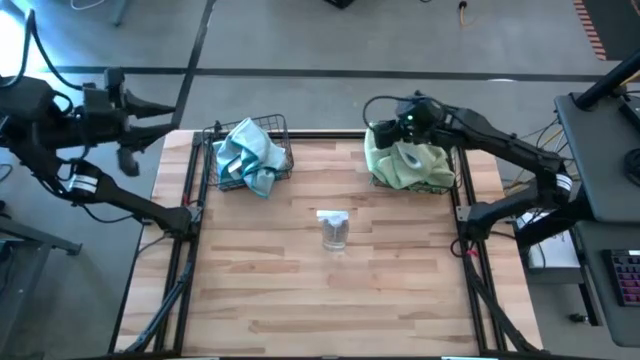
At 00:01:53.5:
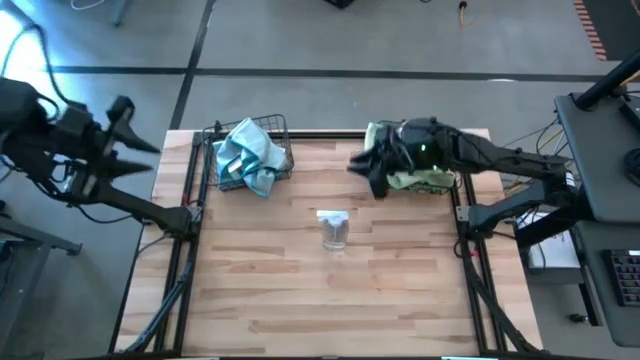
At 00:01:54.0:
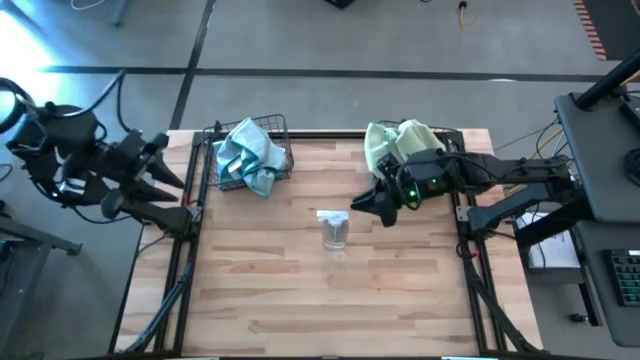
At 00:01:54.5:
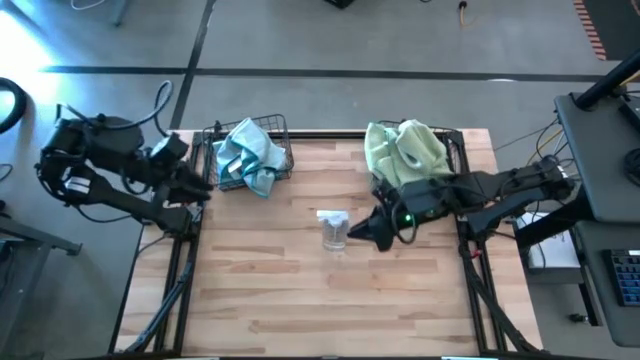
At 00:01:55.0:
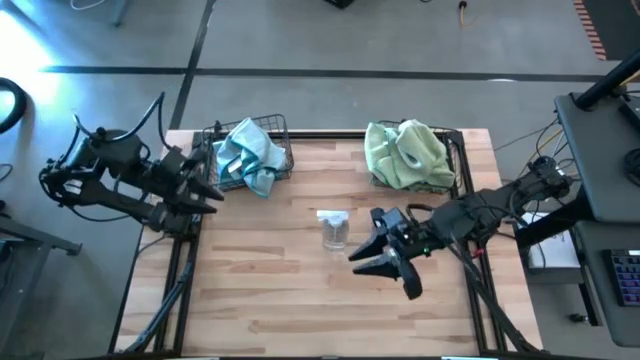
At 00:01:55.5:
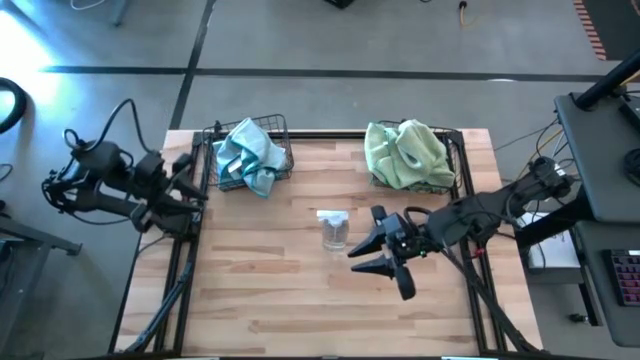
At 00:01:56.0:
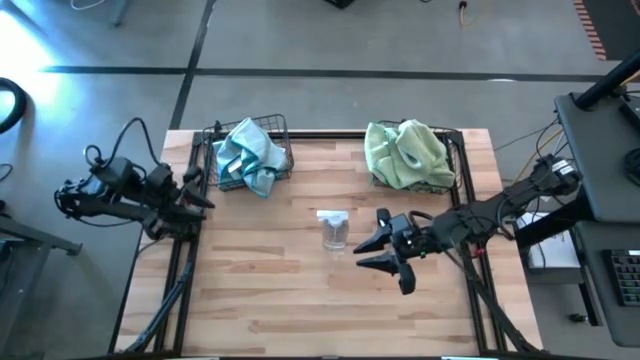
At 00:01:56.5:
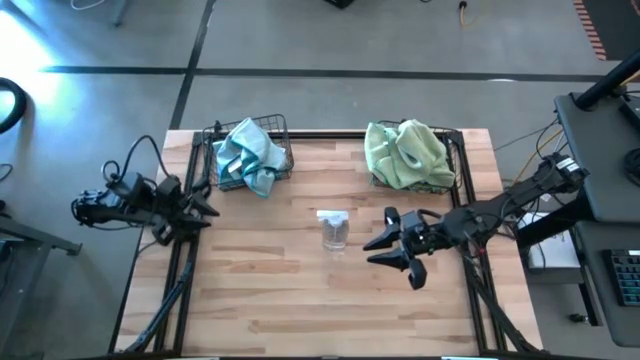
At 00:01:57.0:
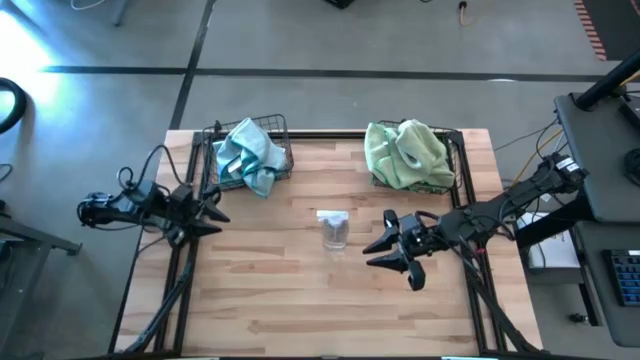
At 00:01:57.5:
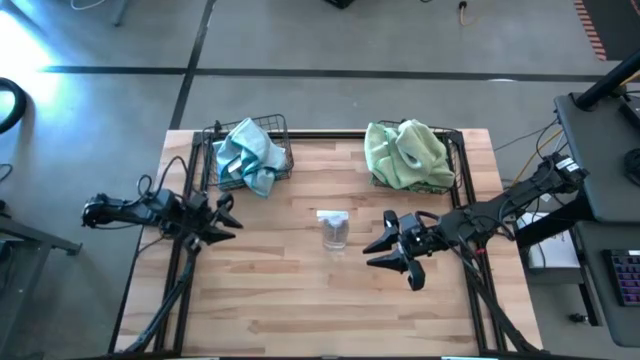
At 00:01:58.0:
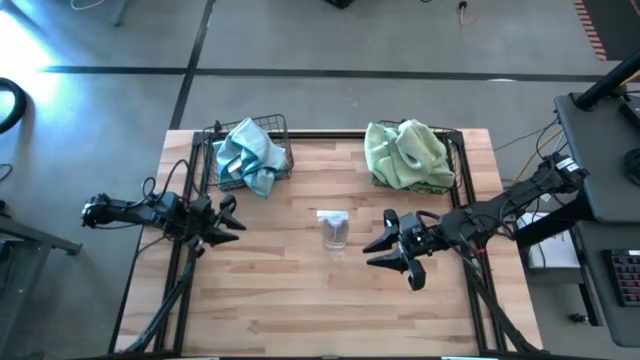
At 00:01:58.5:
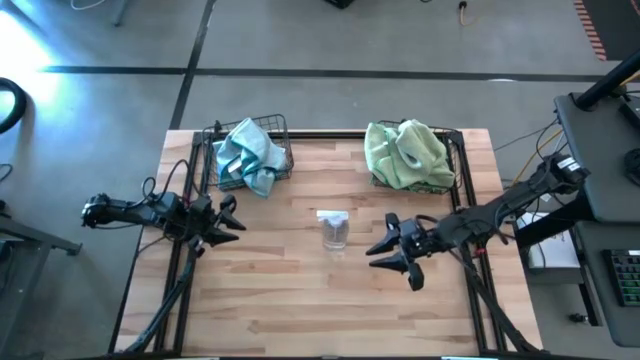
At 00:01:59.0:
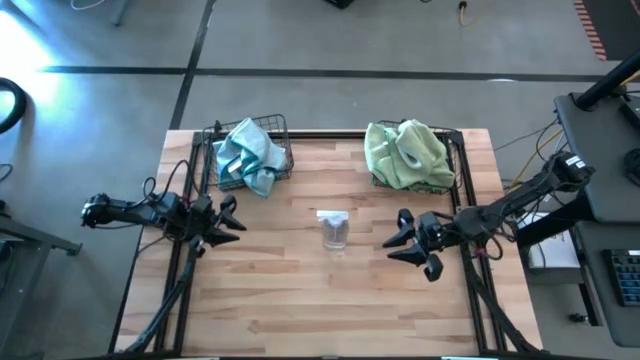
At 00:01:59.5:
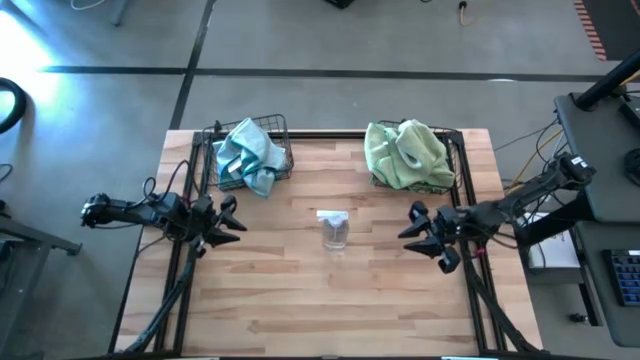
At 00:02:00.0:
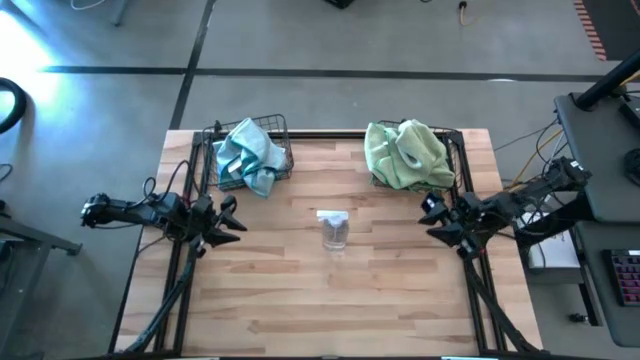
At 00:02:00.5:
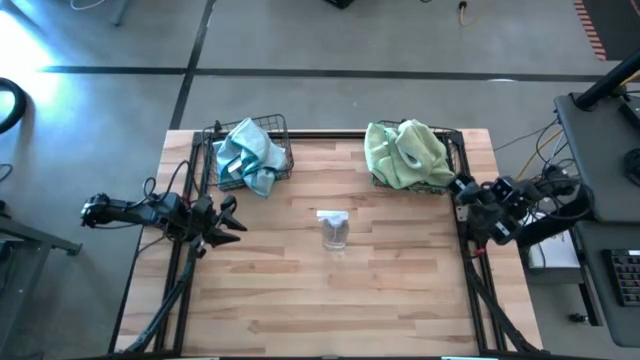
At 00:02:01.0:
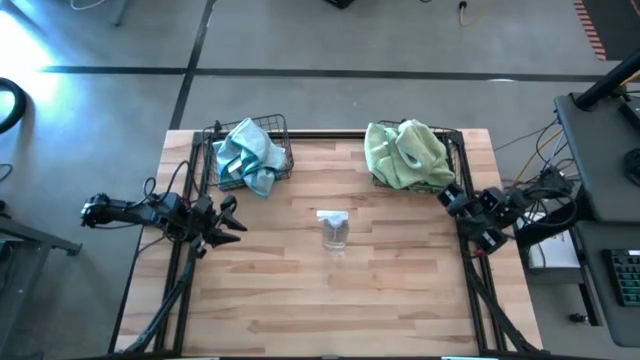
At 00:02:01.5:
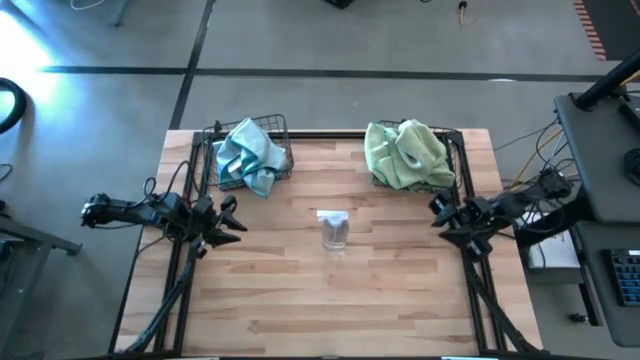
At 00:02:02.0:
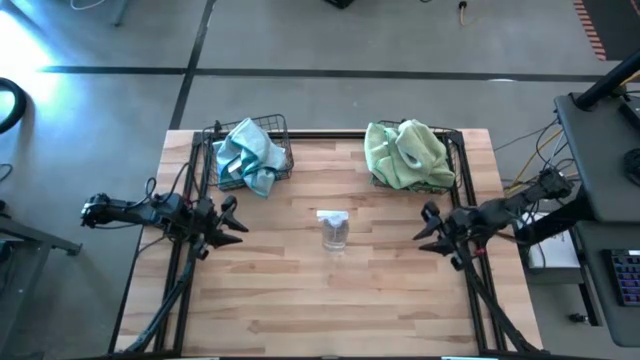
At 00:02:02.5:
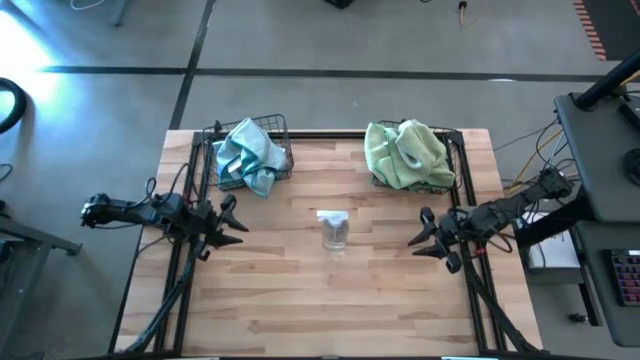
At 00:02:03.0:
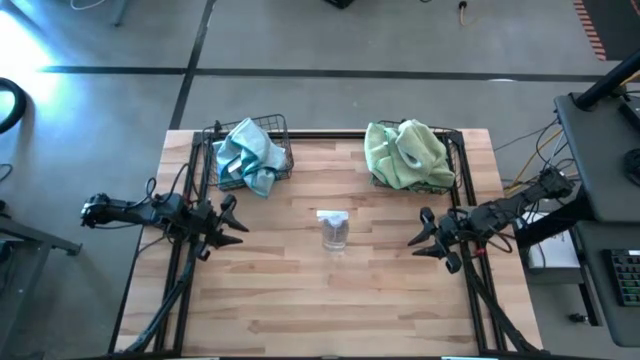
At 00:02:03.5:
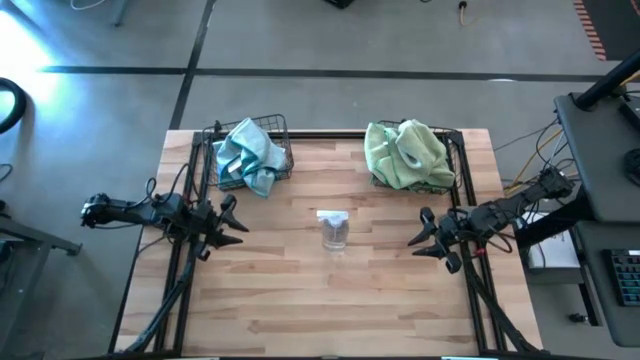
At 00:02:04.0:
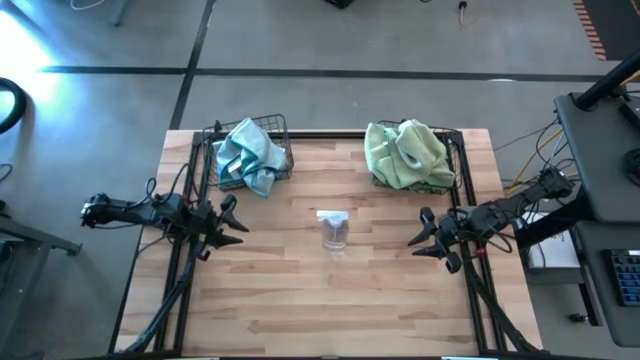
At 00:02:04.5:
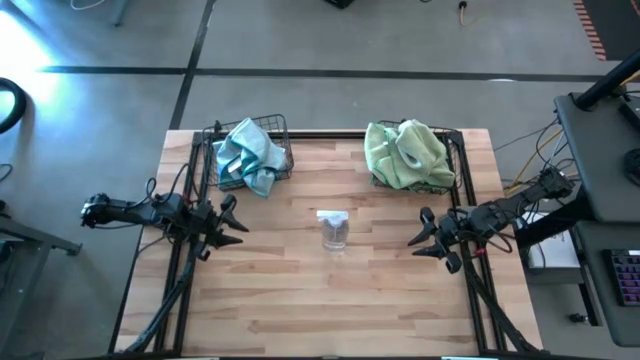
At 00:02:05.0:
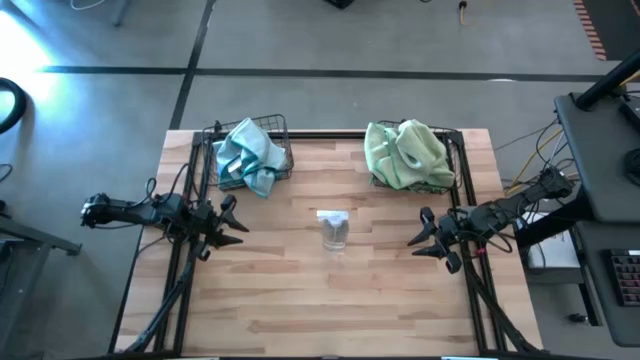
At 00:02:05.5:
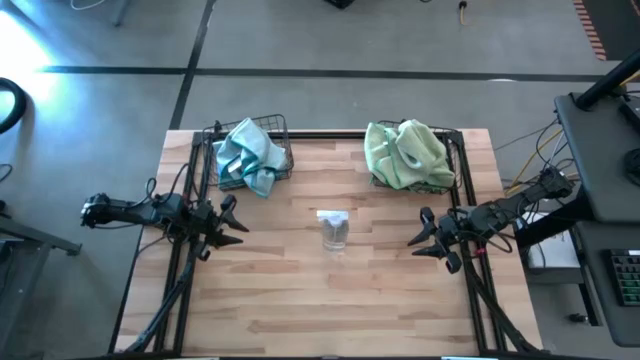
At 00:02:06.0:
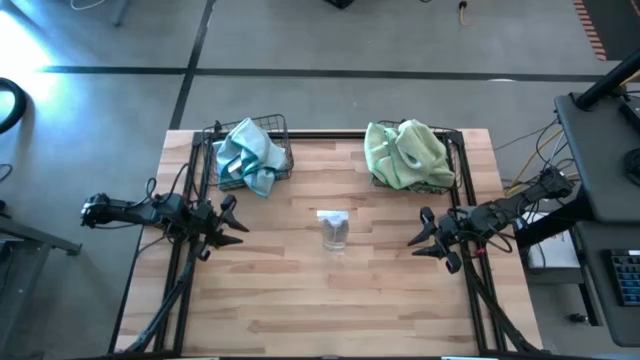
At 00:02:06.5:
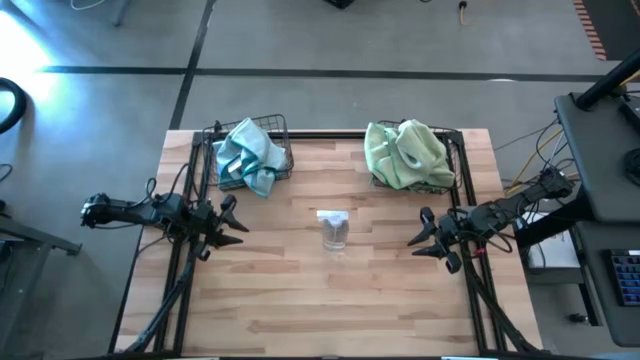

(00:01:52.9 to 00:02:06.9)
Task: Sort microfiber towel by color & place in baskets
Return to Home Position

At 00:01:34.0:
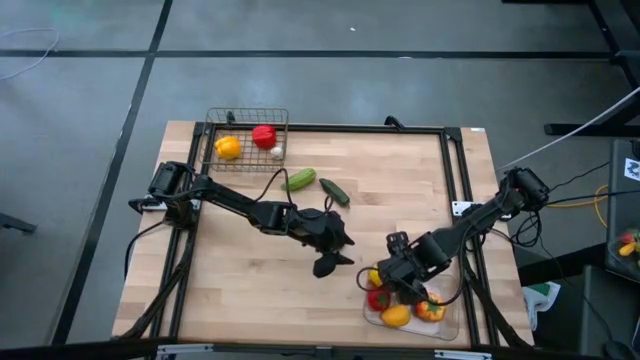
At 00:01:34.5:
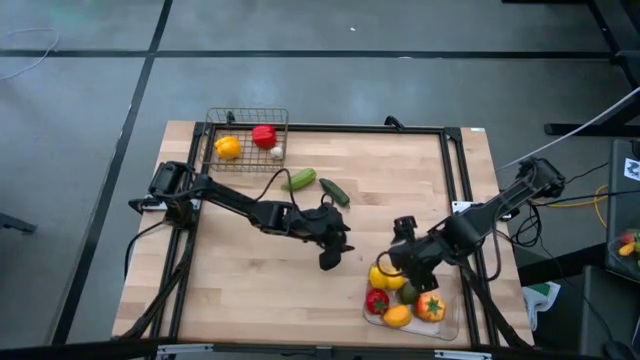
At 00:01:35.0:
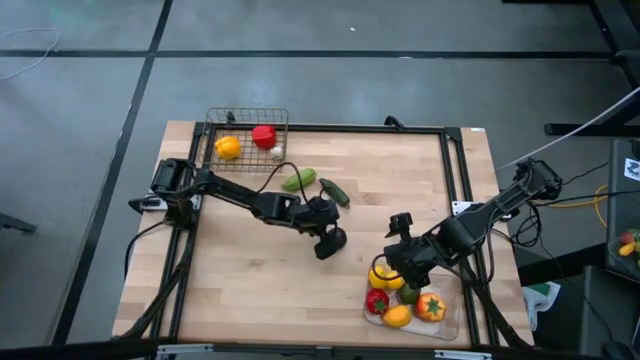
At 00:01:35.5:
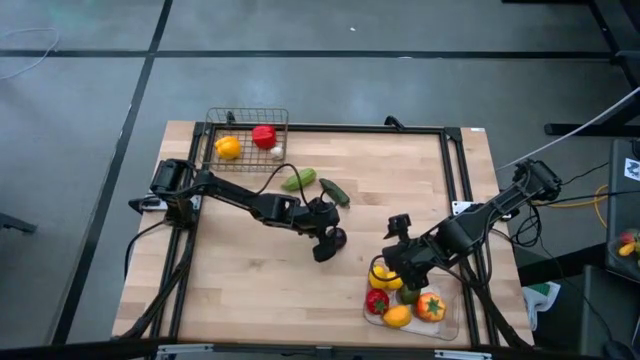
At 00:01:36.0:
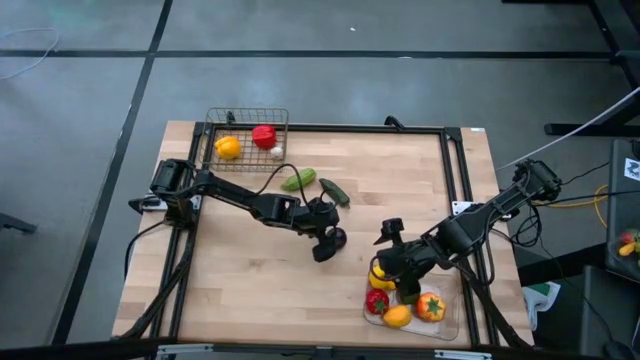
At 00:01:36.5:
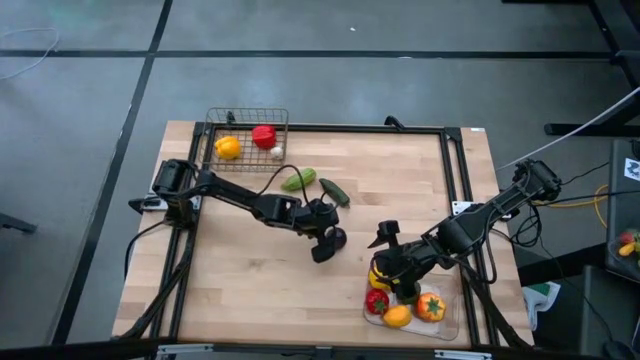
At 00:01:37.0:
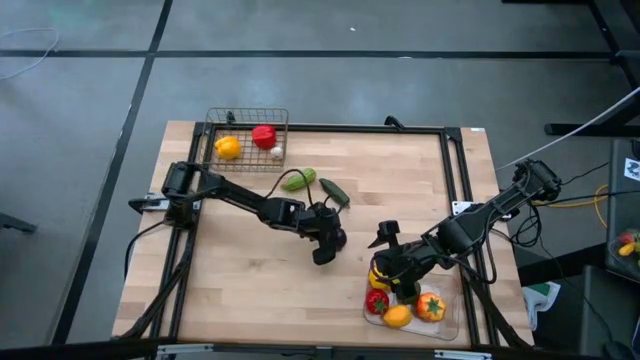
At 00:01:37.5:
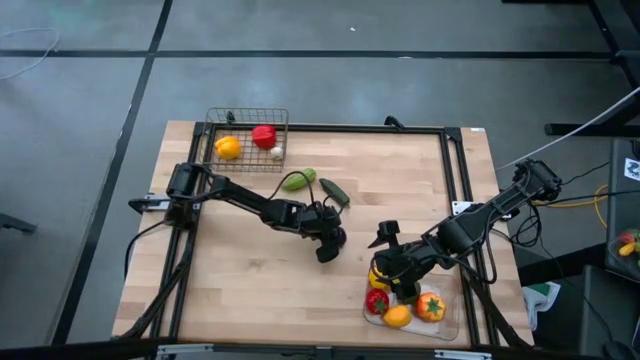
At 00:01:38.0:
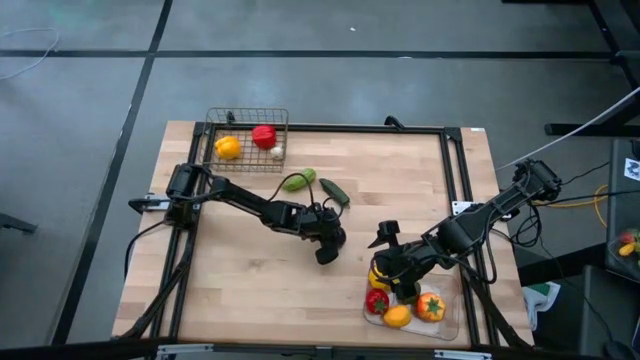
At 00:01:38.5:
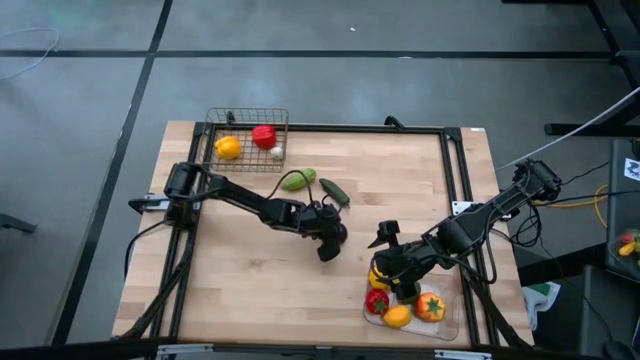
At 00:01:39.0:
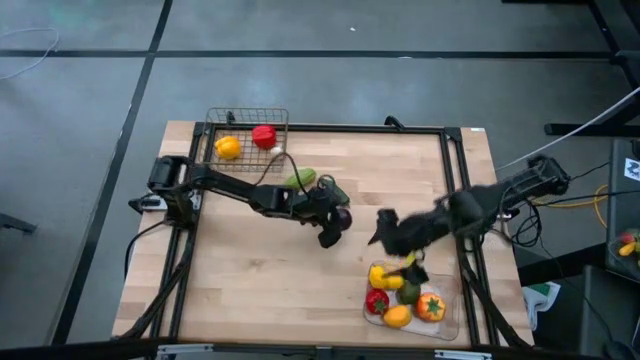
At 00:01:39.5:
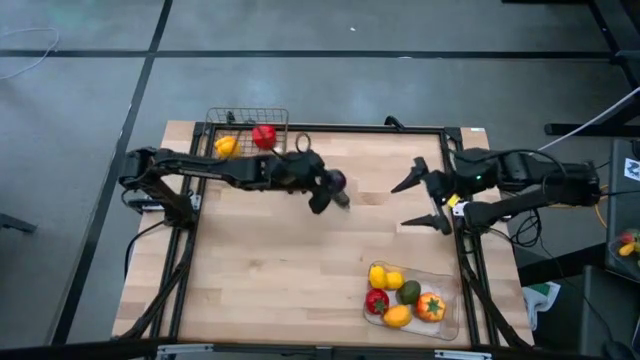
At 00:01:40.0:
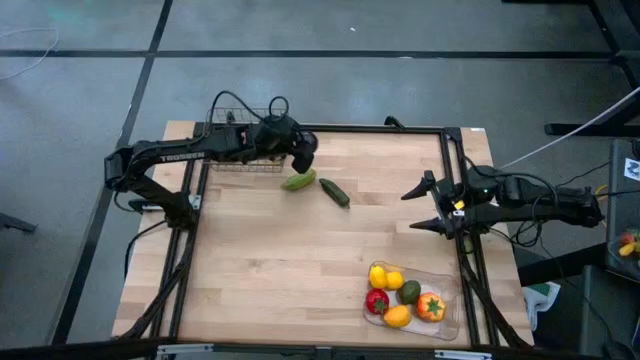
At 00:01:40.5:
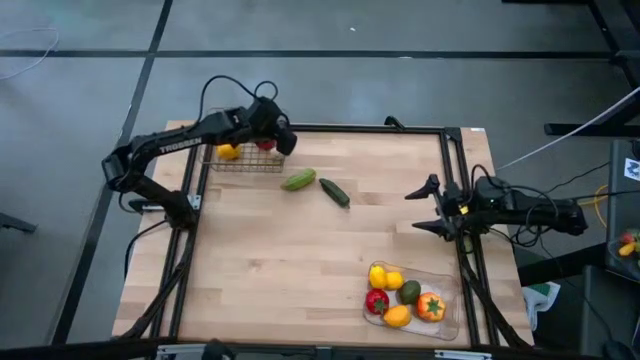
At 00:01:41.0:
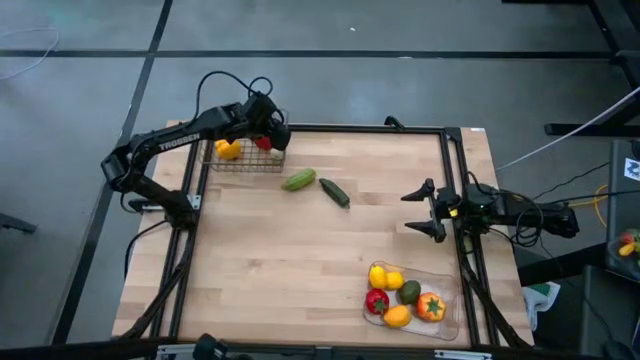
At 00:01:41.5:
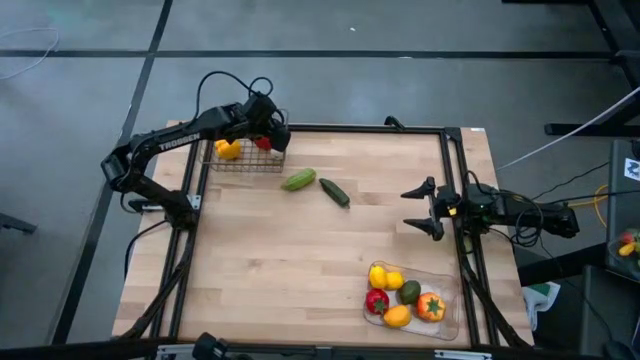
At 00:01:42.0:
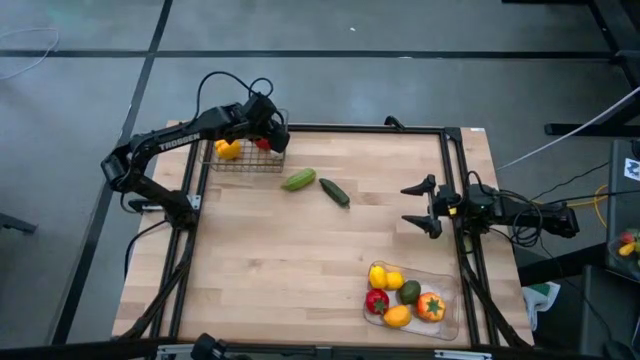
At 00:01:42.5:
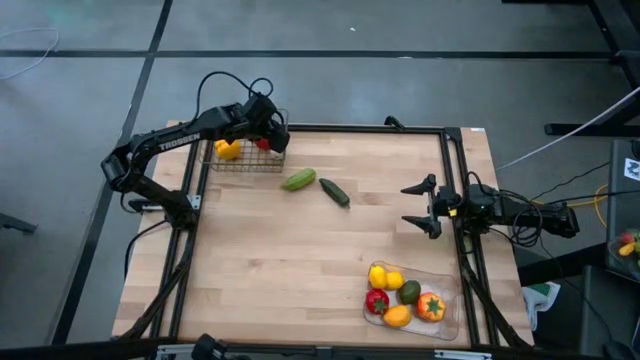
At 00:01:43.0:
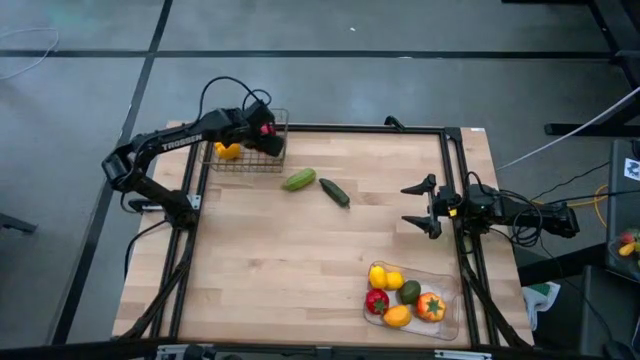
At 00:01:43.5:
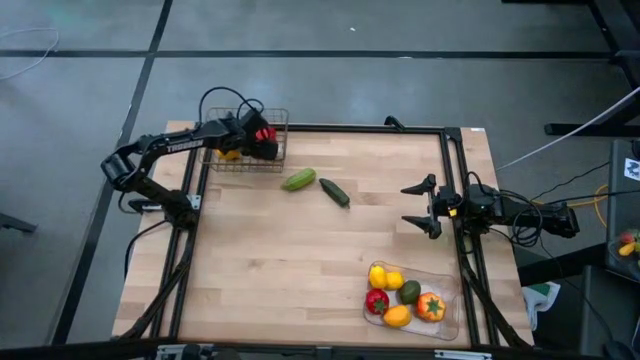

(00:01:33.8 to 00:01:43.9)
Task: Sort produce into baskets
Put the onion into the mesh basket
